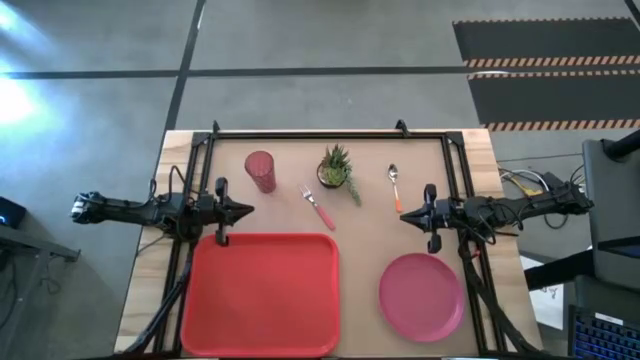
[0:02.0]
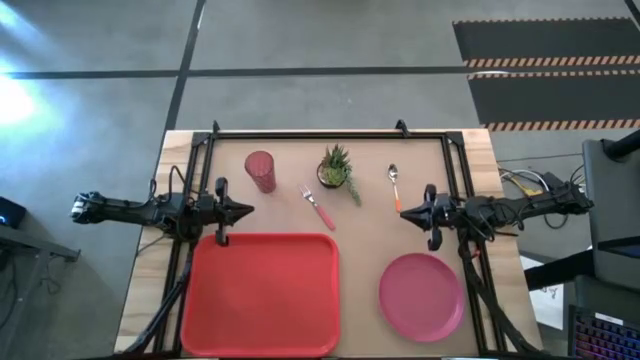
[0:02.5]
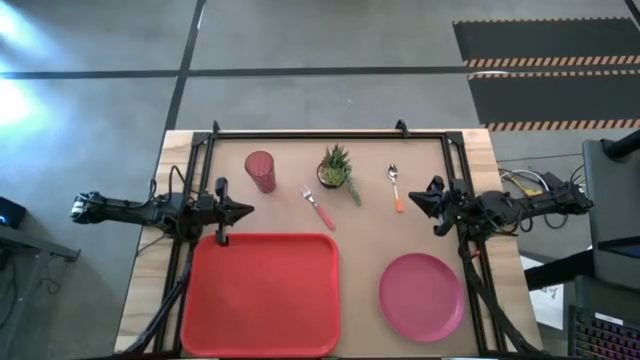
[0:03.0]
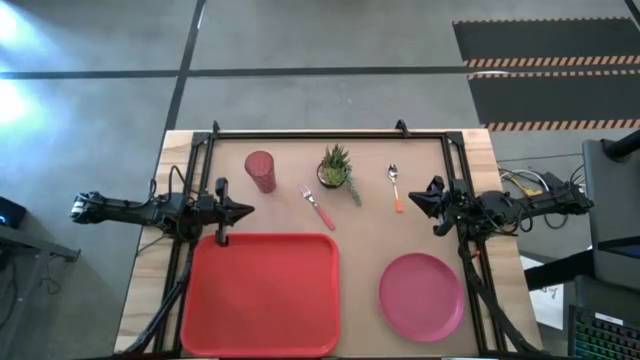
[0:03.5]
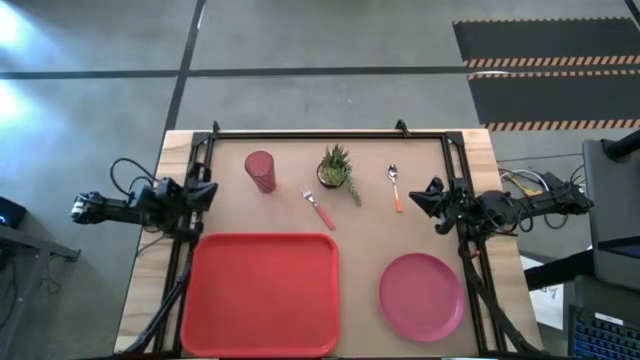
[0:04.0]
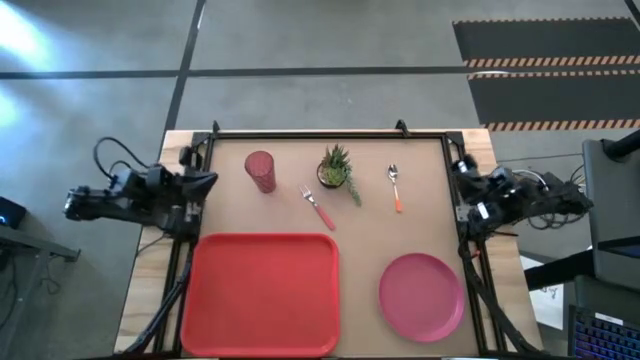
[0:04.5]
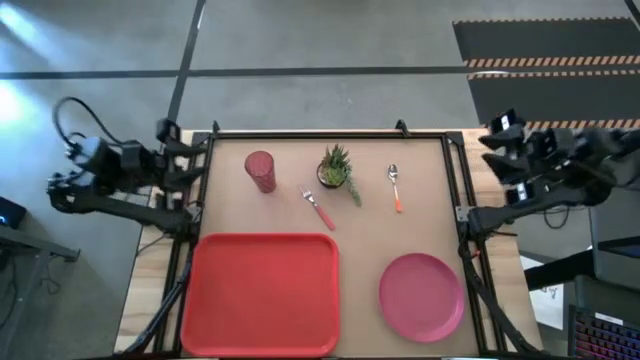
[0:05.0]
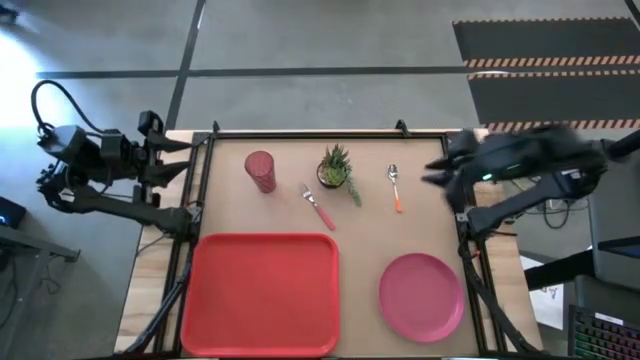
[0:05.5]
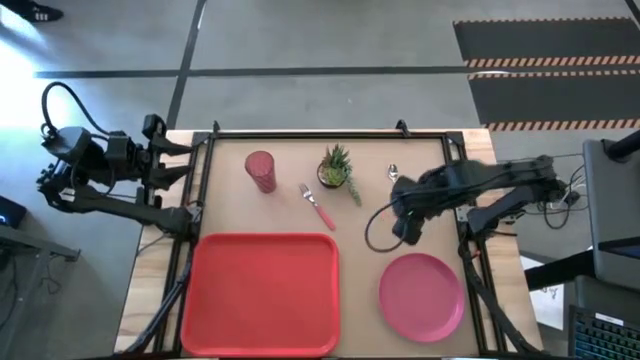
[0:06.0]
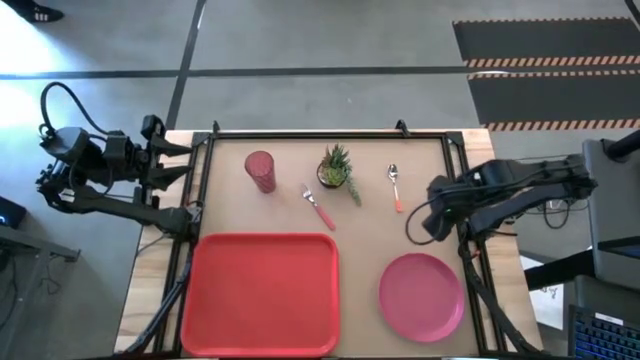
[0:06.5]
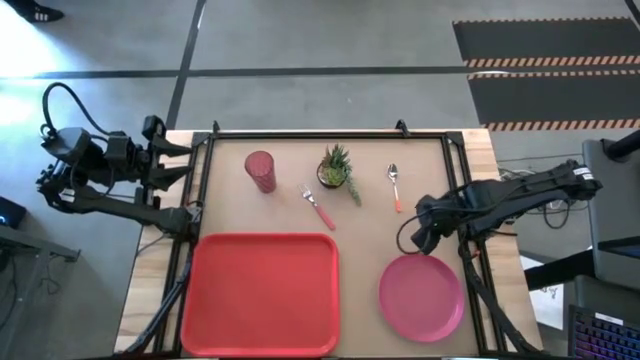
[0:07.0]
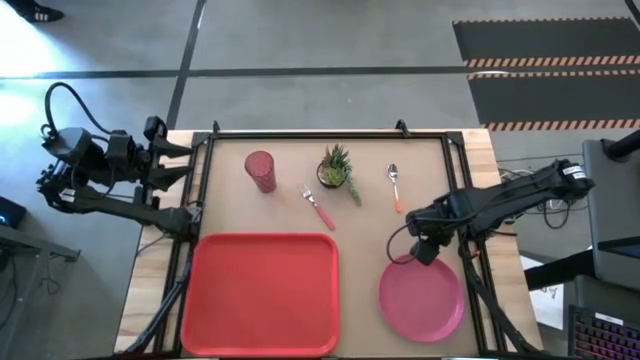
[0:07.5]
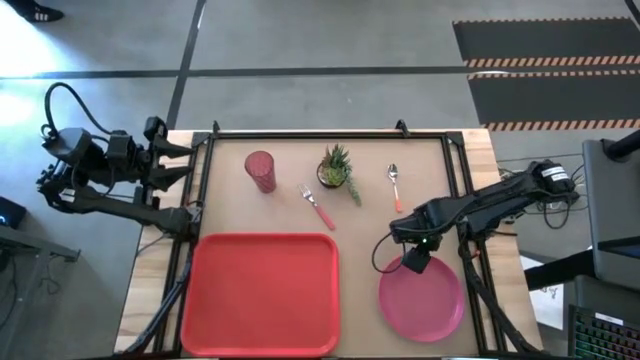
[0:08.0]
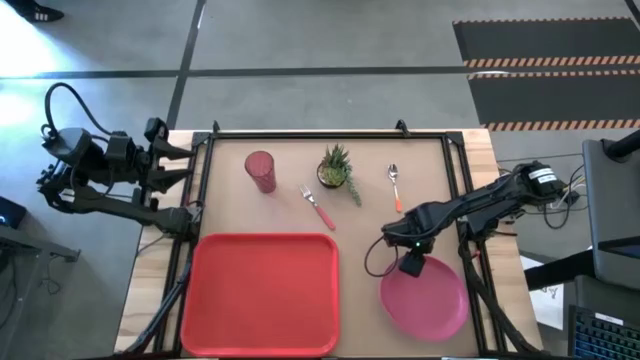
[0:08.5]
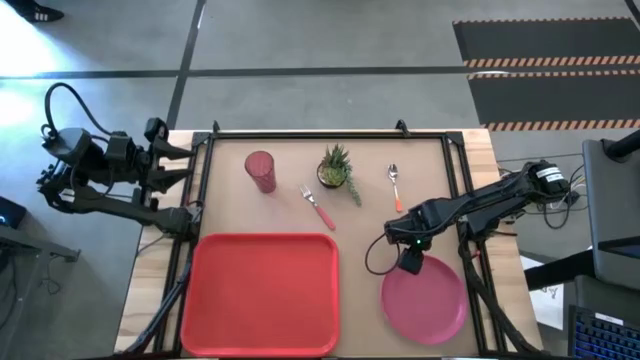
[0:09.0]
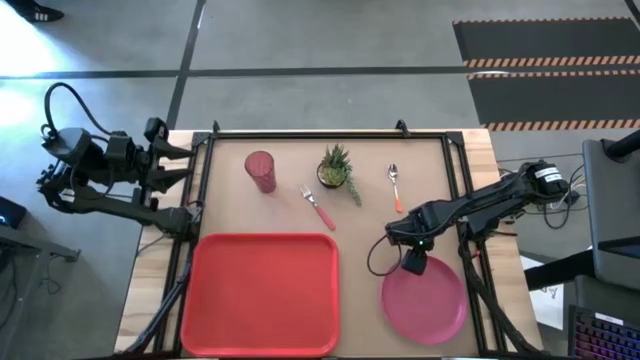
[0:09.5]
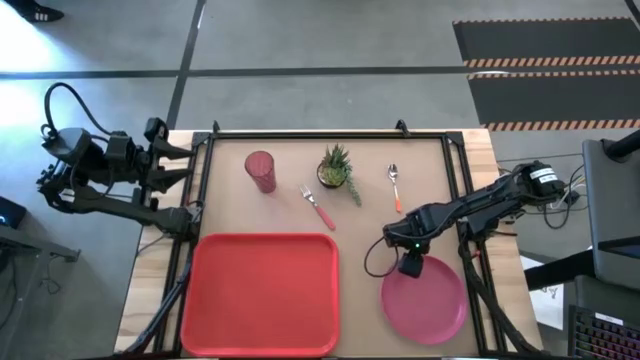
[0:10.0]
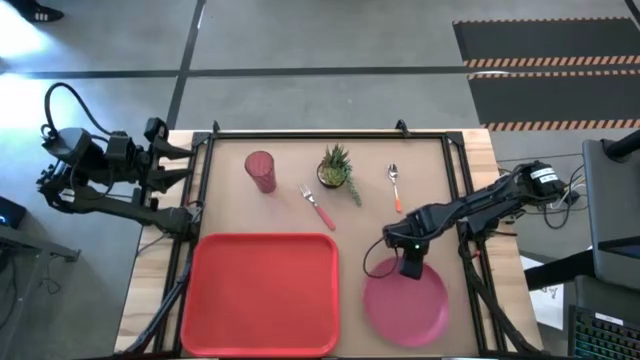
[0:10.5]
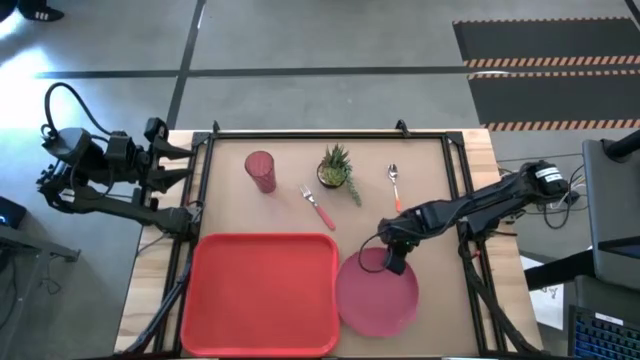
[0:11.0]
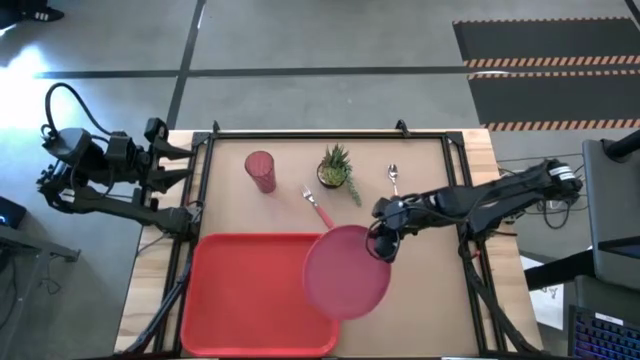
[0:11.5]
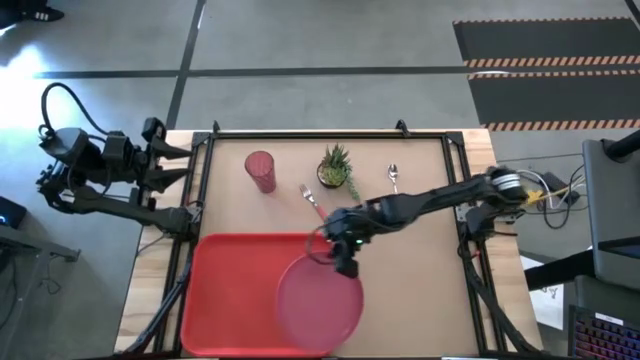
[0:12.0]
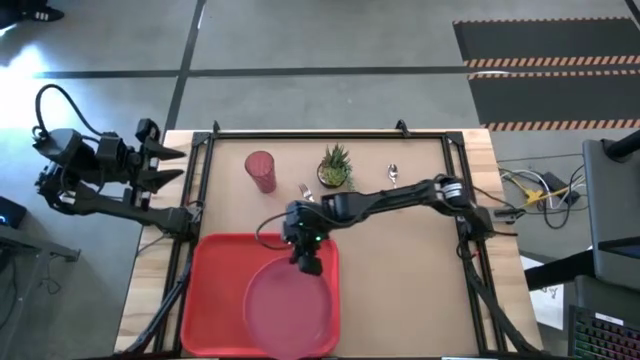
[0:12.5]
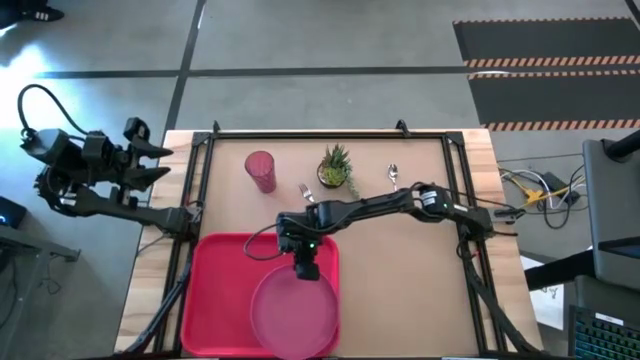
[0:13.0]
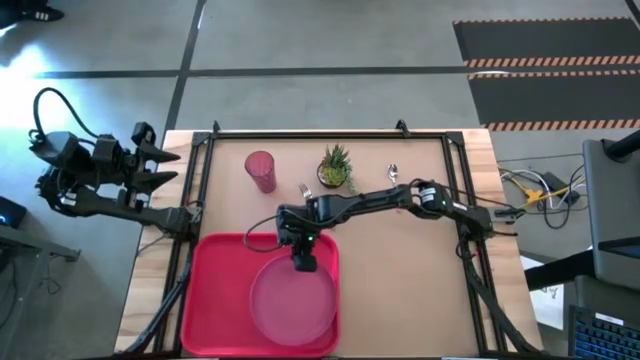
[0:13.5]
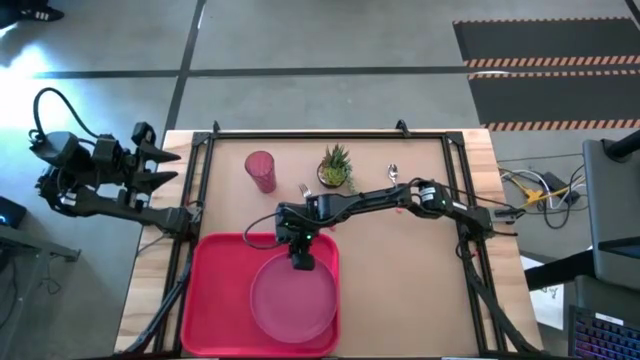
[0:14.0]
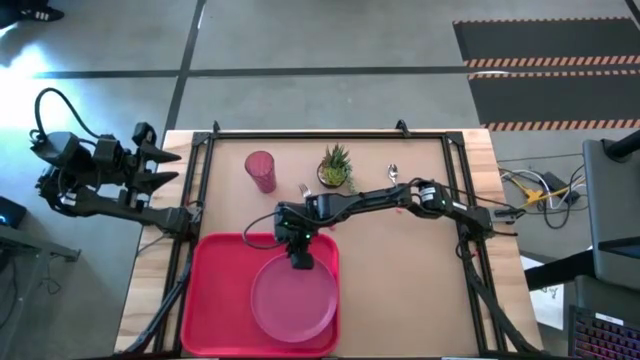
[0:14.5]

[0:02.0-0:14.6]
Task: Pick and place plate/cup/fork/spoon on tray
Put the pink plate on the orange tray

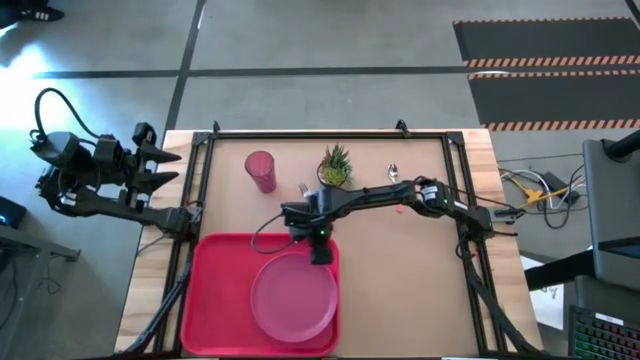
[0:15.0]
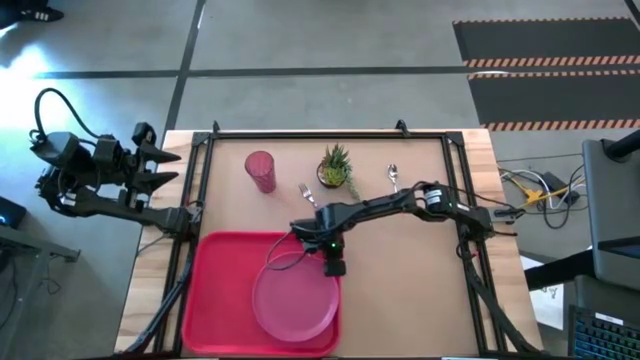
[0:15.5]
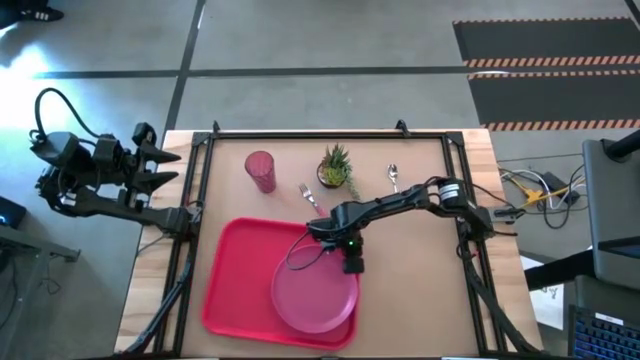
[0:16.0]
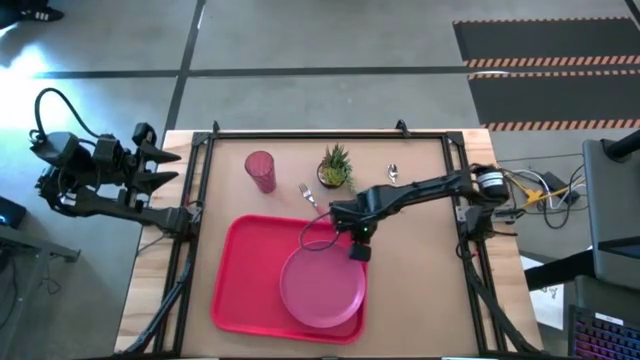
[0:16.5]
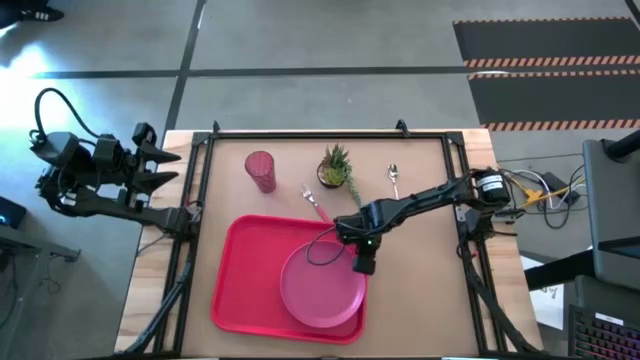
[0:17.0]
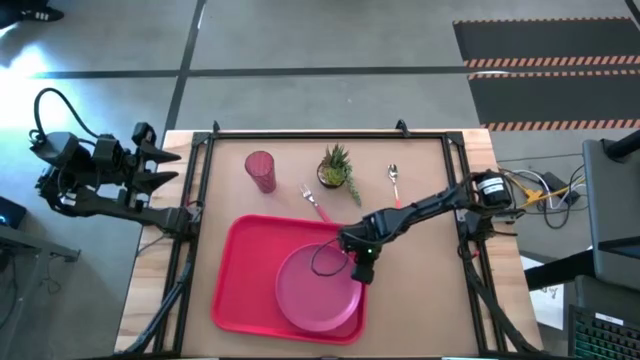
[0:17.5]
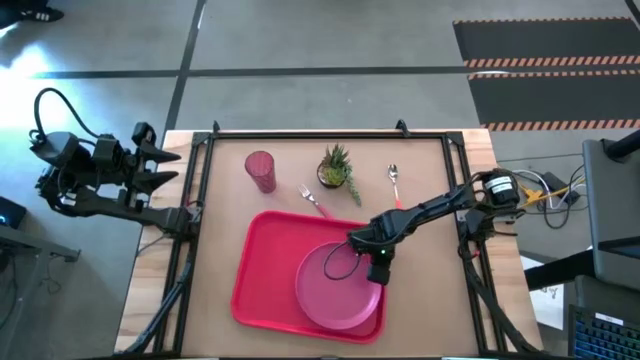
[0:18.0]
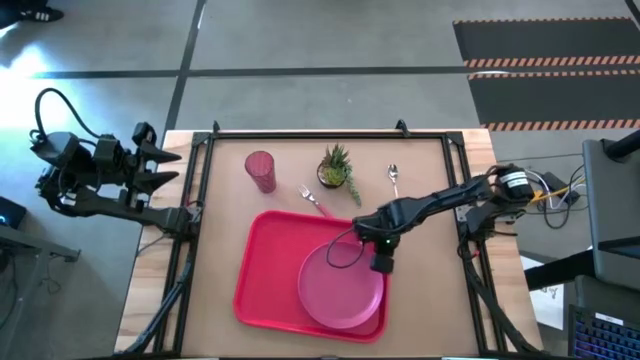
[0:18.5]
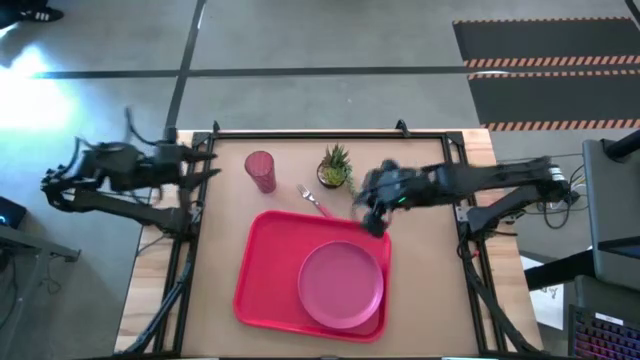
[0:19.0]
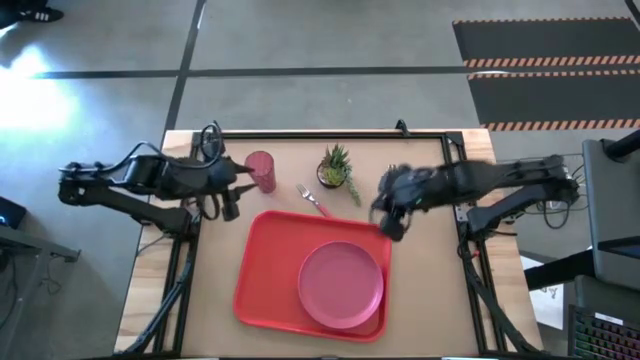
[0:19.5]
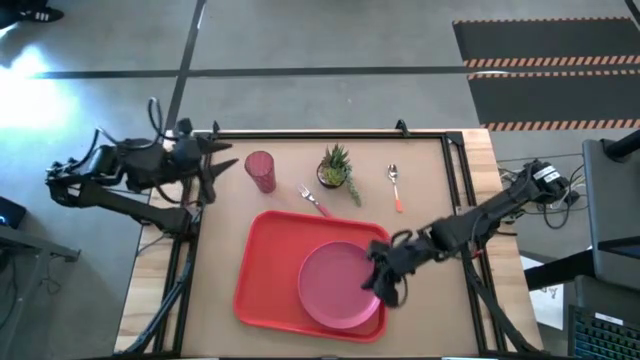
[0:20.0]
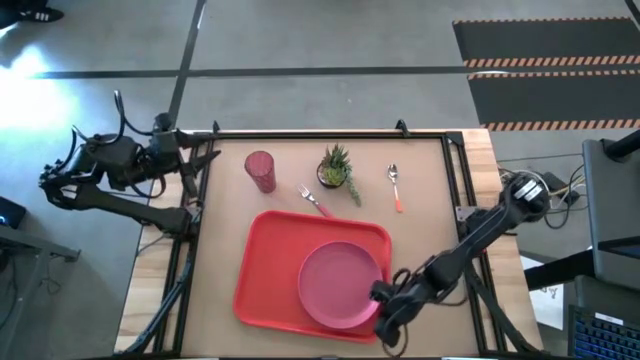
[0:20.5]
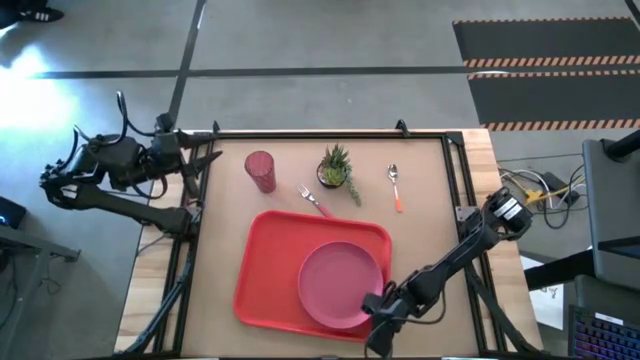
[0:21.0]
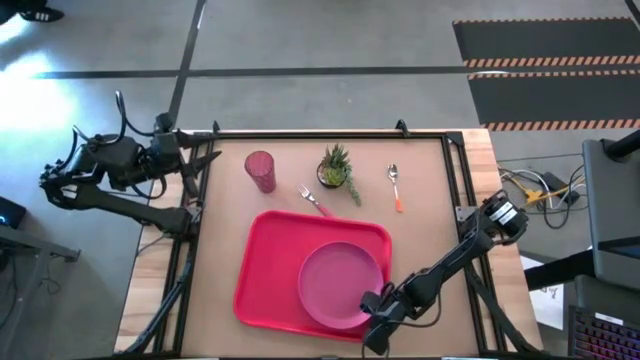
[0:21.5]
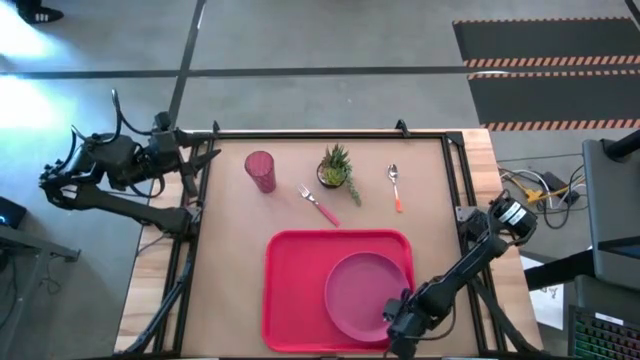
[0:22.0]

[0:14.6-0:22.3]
Move the orange tray to the bottom center of the table

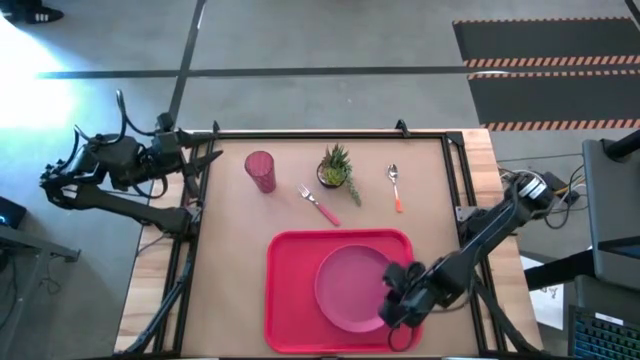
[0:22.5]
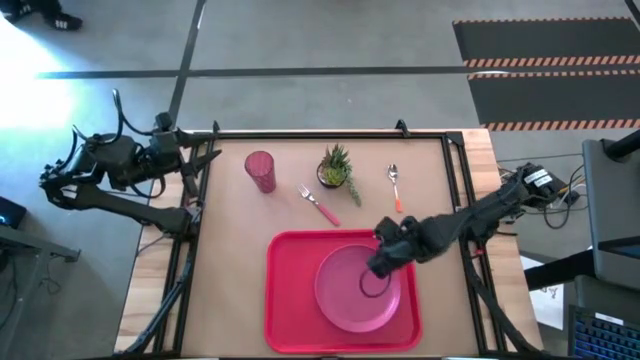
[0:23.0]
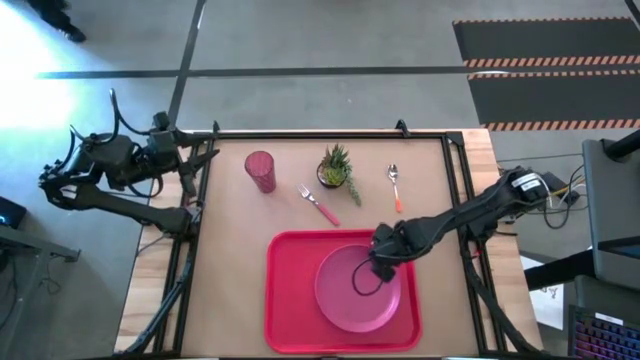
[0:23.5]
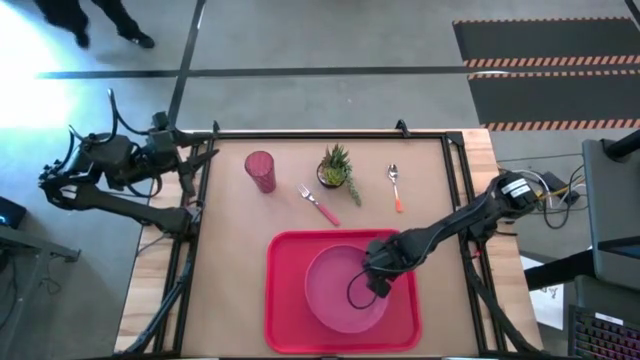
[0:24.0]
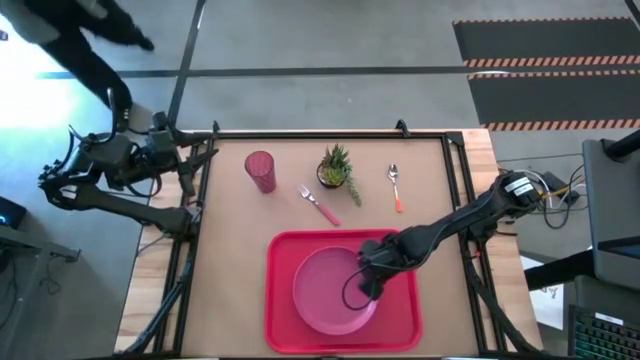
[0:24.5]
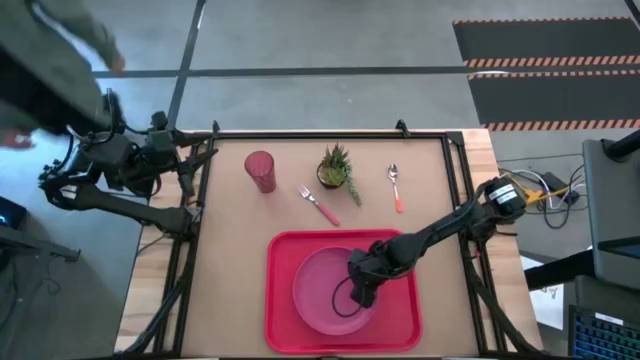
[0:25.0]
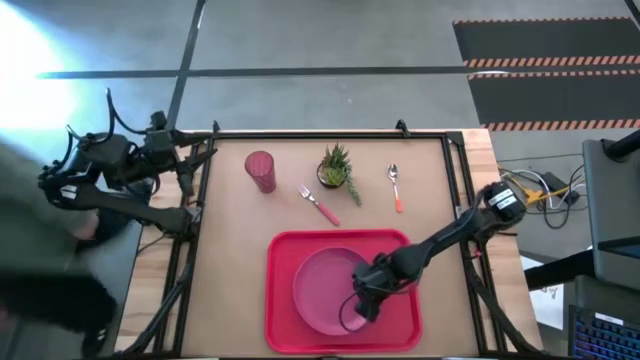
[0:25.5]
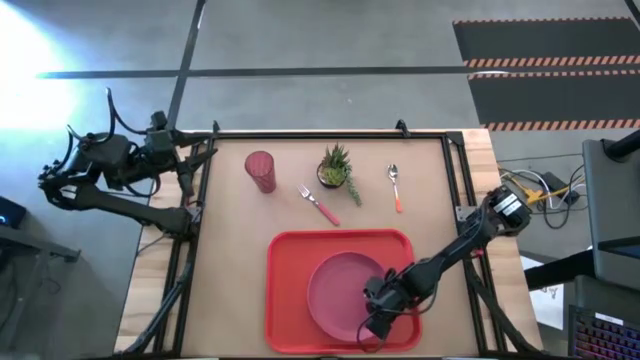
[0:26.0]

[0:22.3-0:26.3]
Adjust the pink plate on the orange tray
